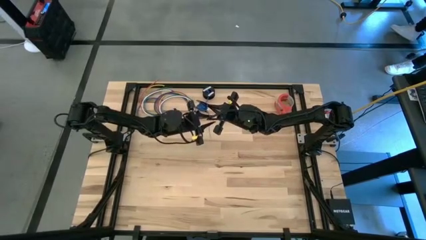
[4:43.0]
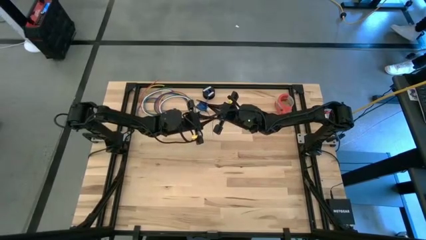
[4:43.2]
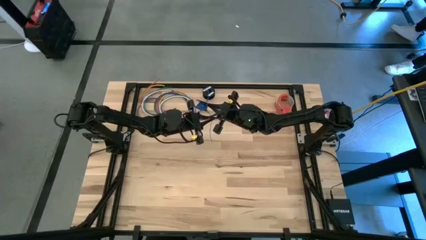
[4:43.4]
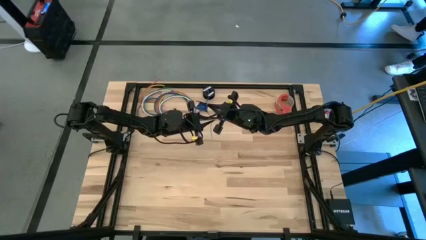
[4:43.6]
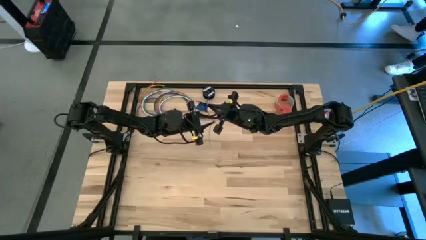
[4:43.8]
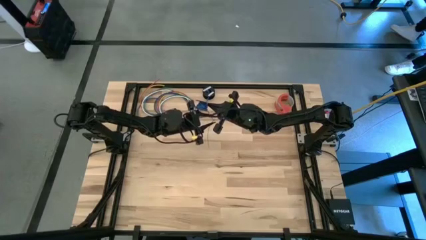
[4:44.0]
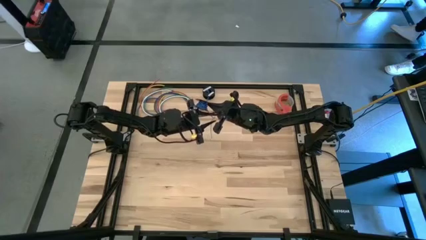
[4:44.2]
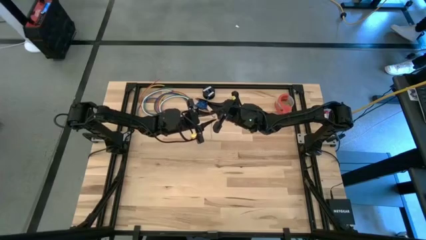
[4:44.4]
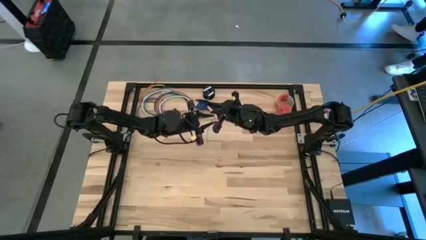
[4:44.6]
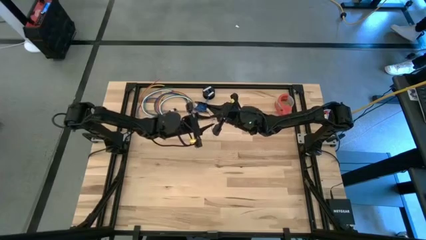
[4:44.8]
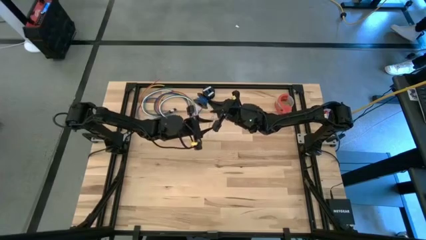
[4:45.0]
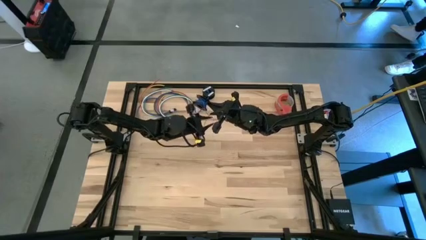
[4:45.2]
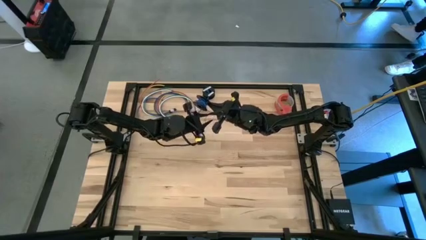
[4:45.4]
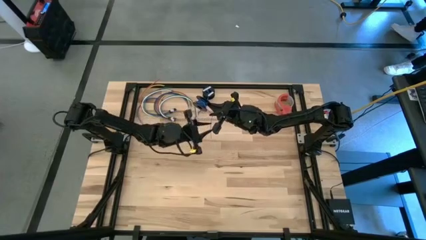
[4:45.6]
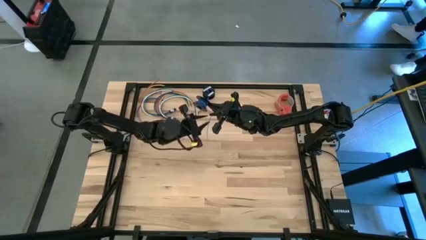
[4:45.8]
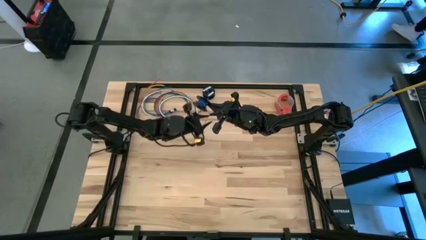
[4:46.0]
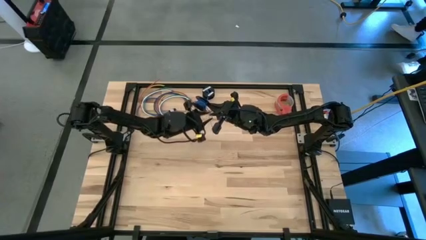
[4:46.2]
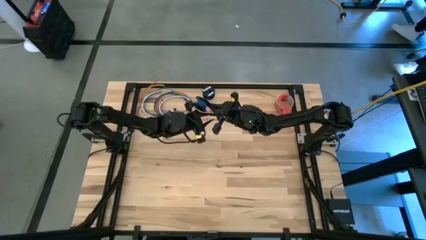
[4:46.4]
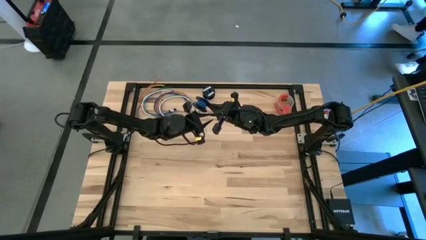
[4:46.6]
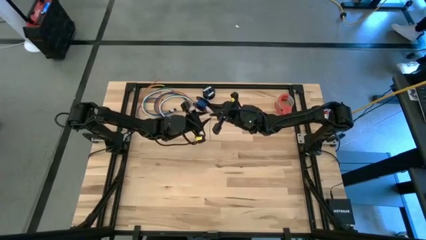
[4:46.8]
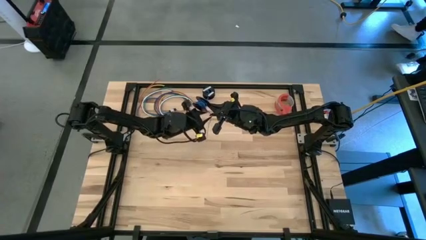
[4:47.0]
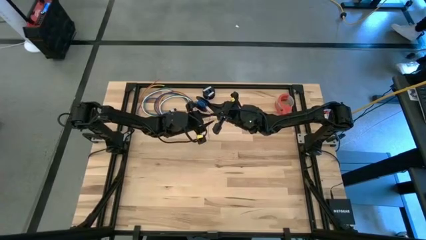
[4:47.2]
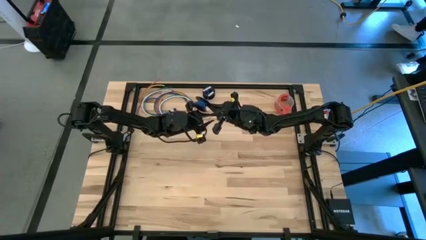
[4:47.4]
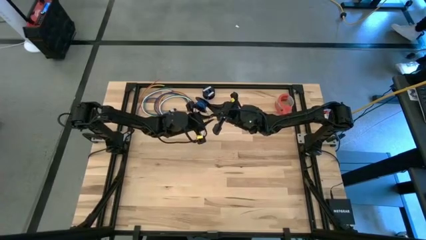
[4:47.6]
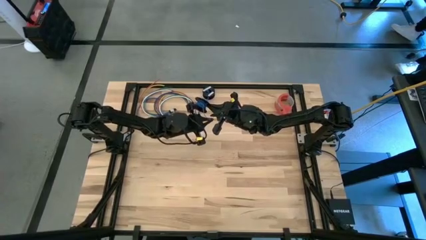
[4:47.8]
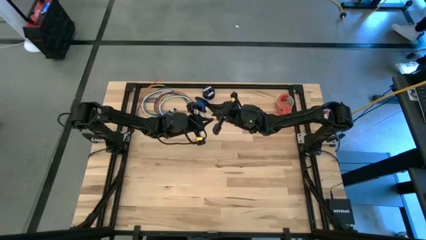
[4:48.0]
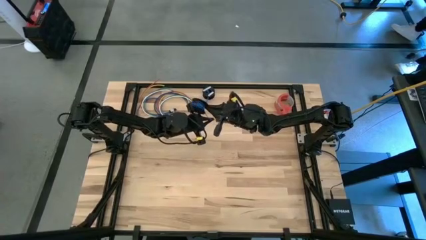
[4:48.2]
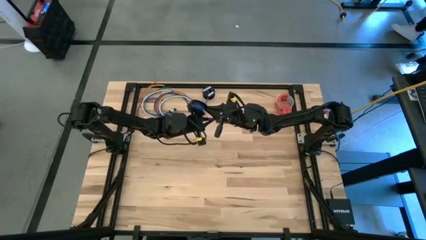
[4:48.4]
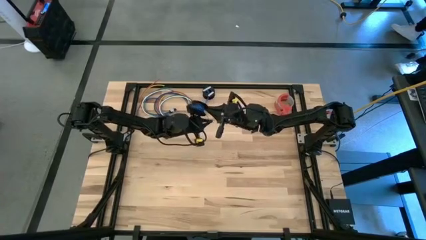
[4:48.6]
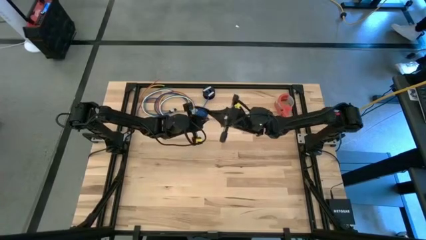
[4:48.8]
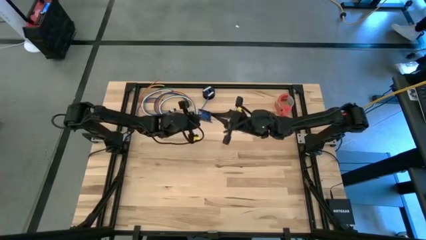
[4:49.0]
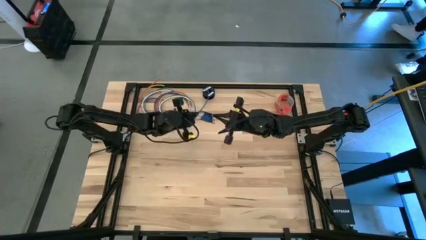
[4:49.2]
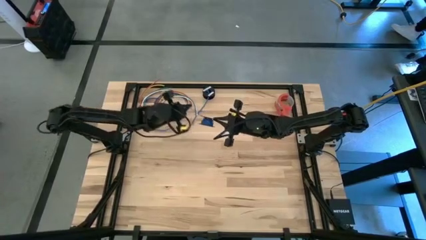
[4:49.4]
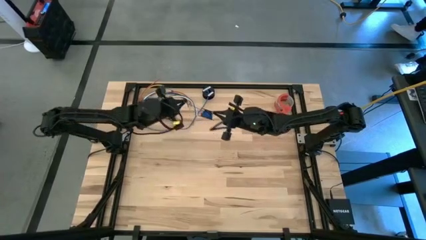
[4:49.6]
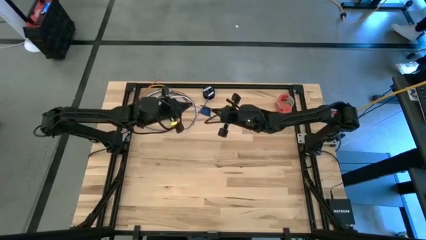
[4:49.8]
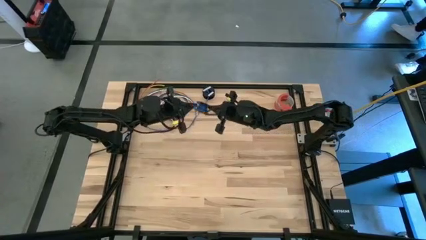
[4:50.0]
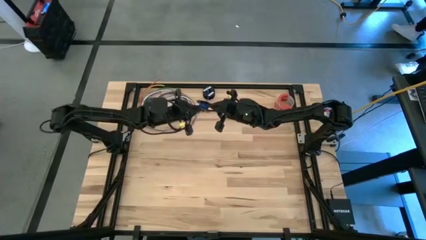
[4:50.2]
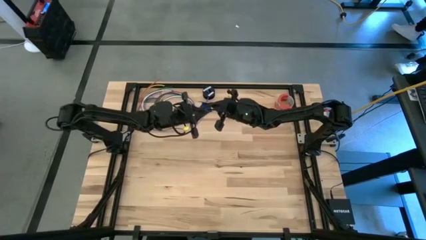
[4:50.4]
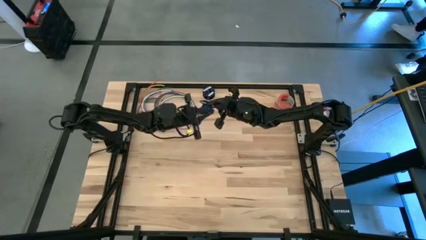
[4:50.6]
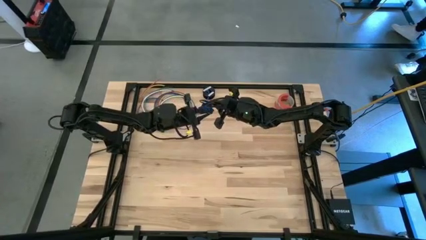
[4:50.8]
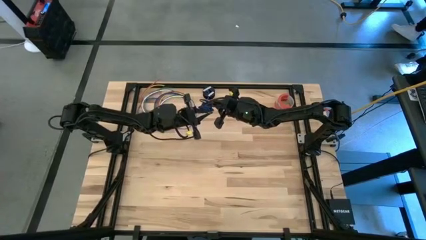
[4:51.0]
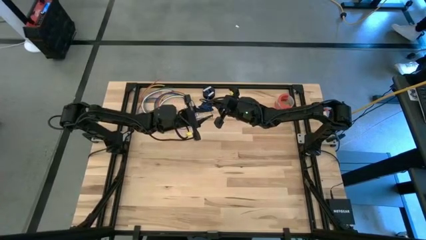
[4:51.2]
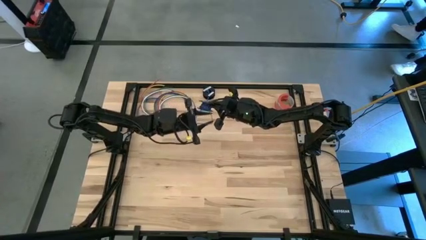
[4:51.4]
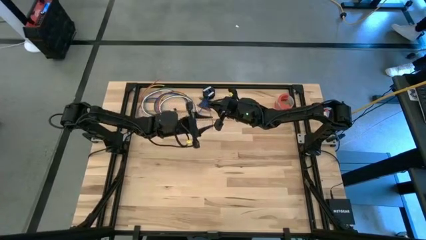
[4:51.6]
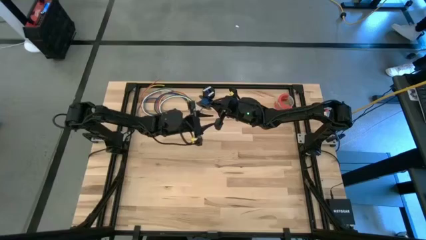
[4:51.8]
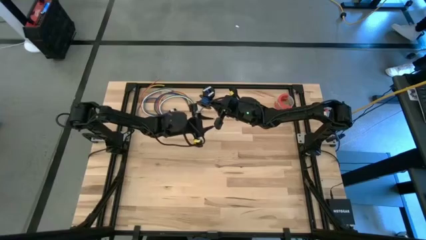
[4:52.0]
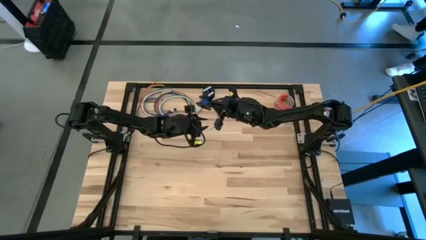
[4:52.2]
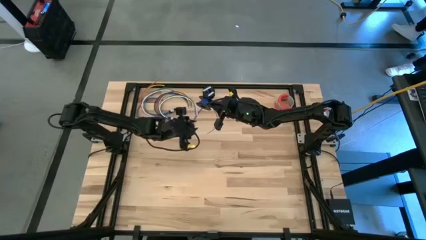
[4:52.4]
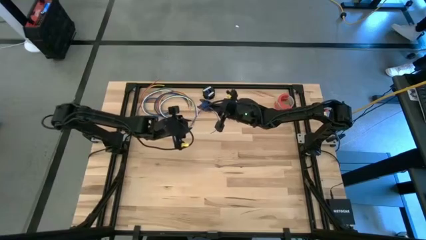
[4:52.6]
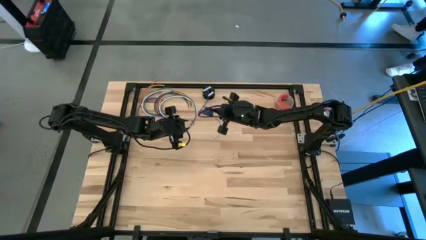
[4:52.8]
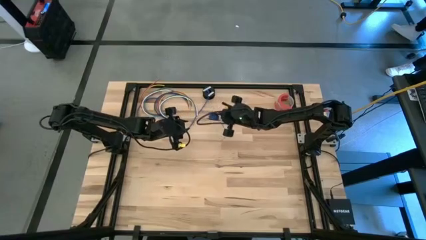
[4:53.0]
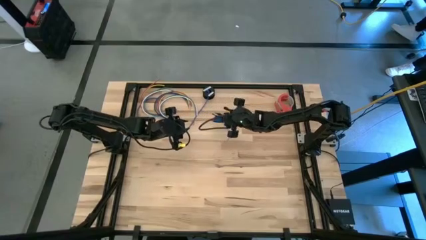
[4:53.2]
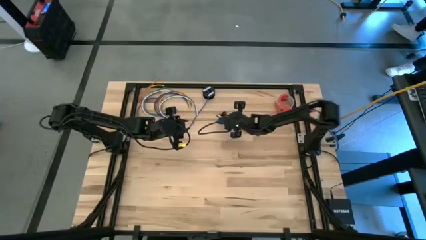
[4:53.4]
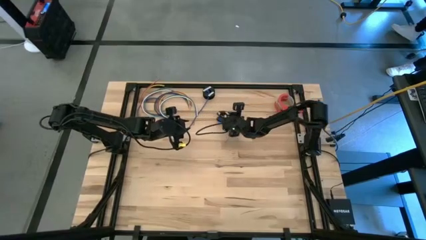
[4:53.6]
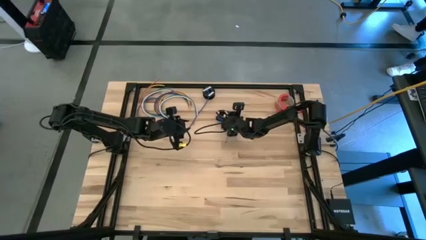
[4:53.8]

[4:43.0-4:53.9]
Task: Coil cords
Coil the blue wire onto the black spool

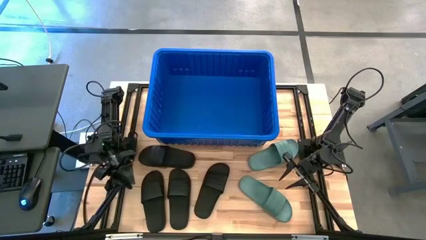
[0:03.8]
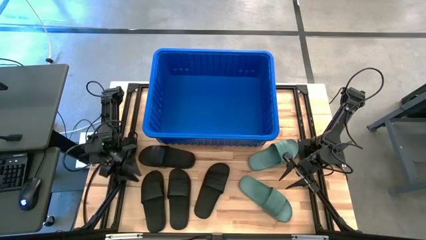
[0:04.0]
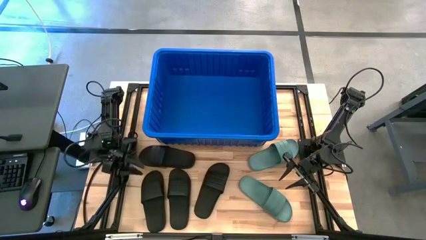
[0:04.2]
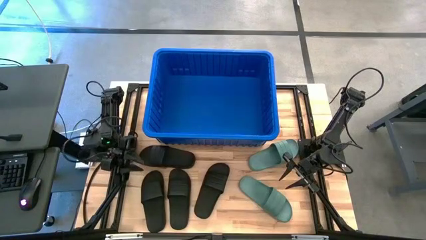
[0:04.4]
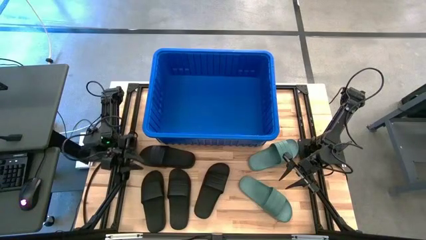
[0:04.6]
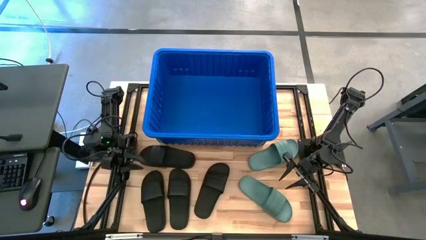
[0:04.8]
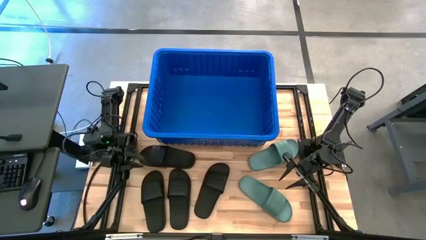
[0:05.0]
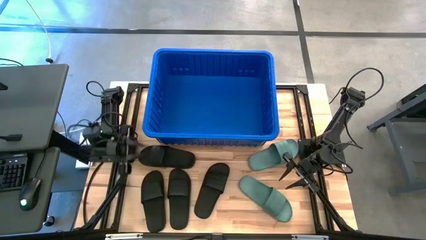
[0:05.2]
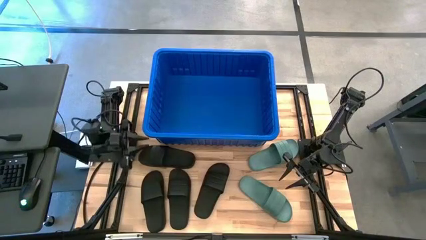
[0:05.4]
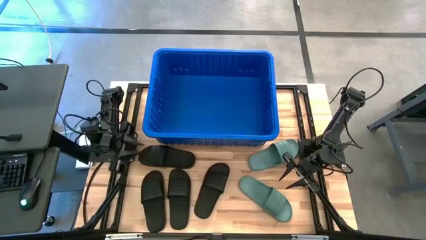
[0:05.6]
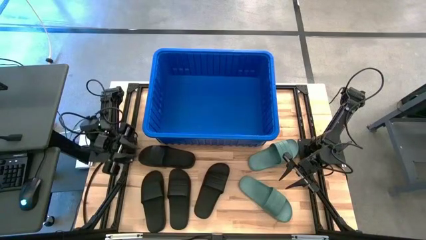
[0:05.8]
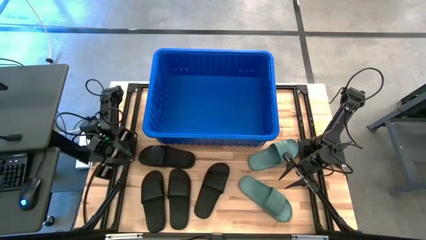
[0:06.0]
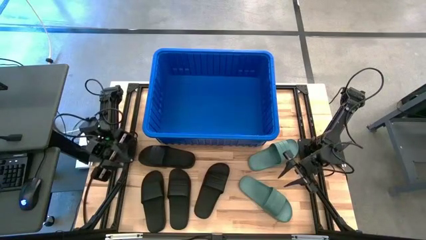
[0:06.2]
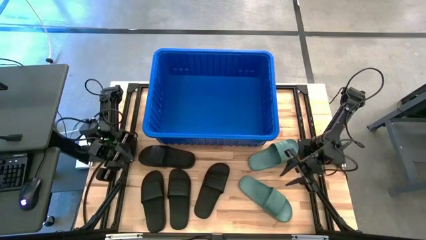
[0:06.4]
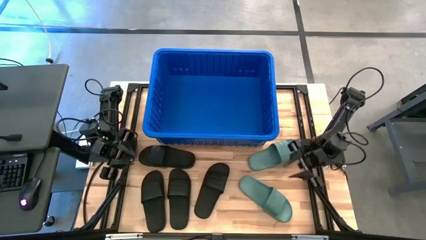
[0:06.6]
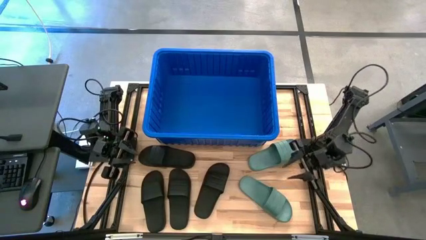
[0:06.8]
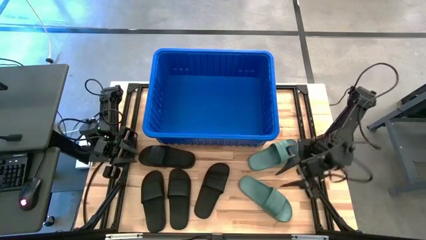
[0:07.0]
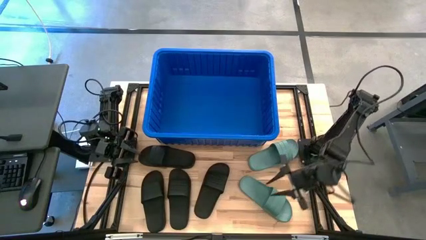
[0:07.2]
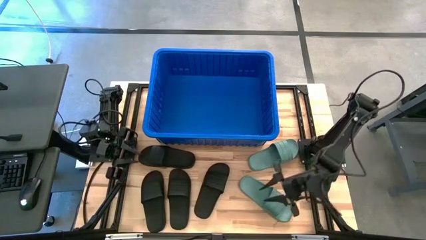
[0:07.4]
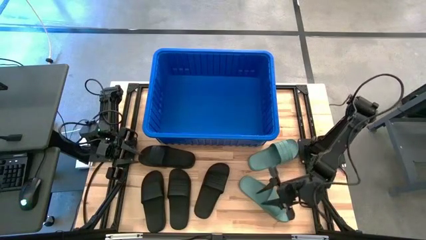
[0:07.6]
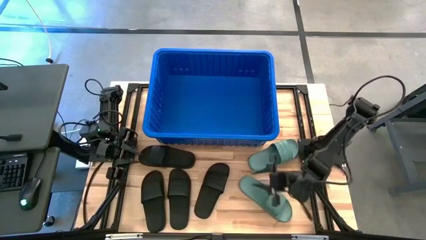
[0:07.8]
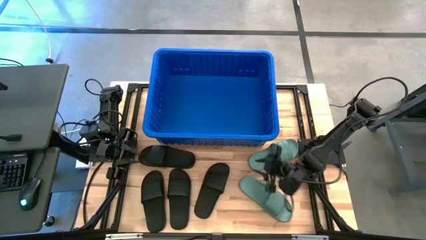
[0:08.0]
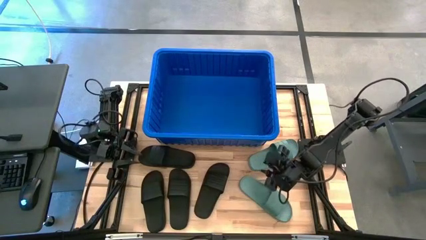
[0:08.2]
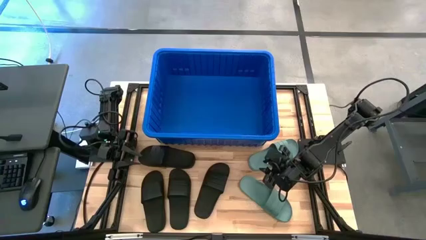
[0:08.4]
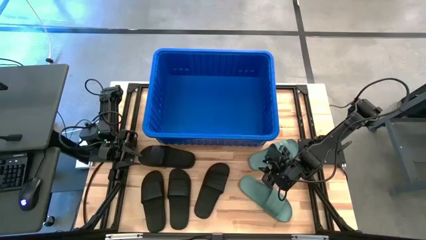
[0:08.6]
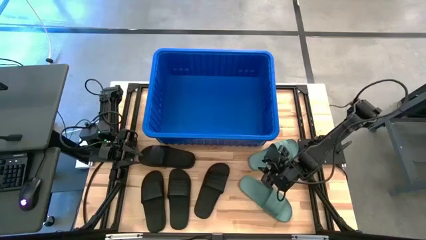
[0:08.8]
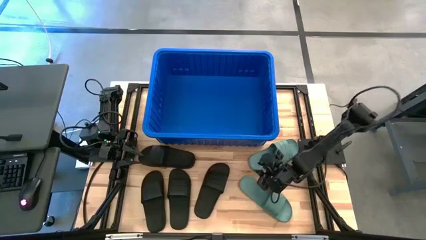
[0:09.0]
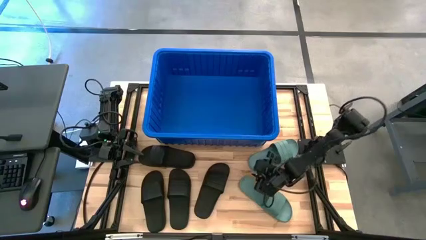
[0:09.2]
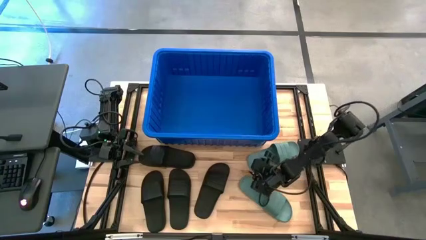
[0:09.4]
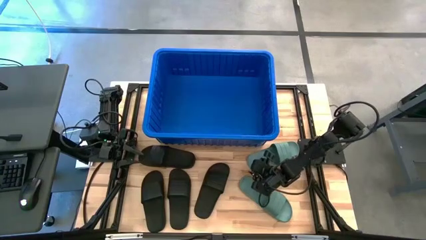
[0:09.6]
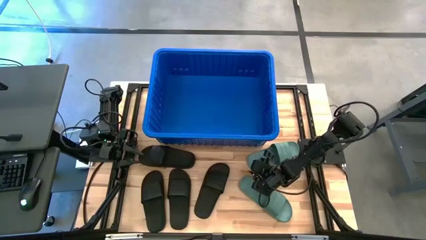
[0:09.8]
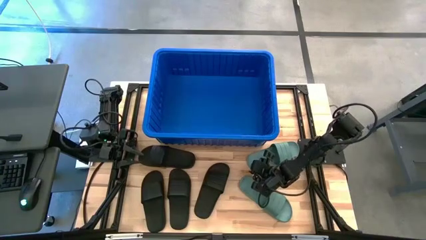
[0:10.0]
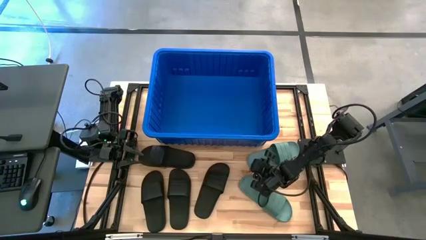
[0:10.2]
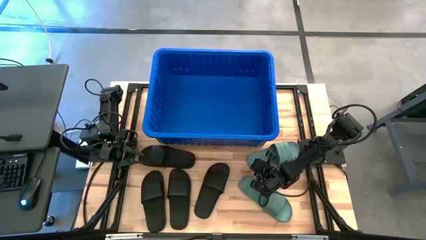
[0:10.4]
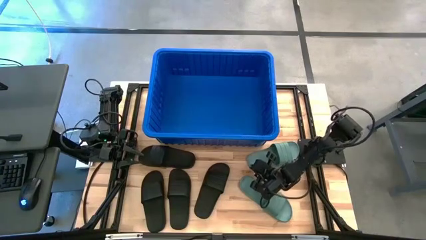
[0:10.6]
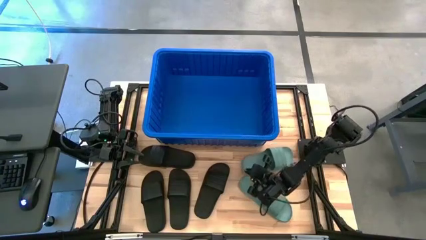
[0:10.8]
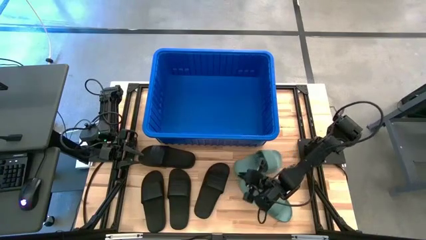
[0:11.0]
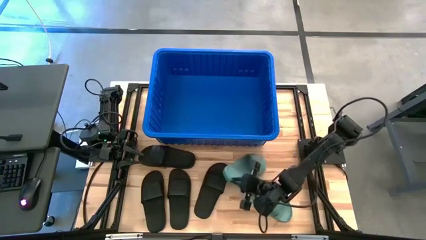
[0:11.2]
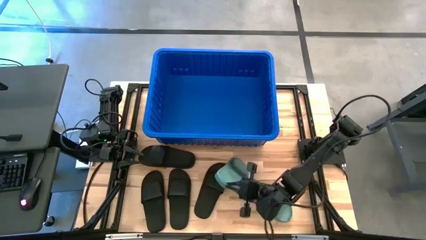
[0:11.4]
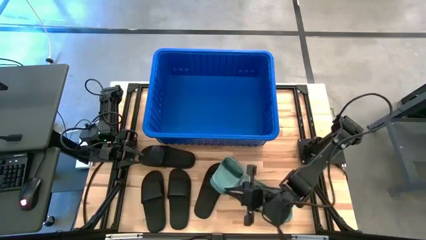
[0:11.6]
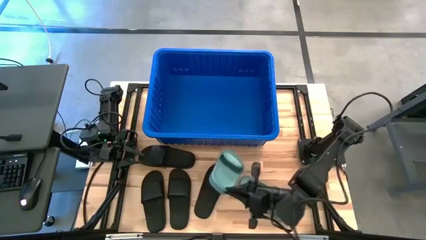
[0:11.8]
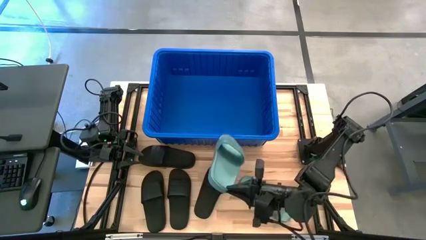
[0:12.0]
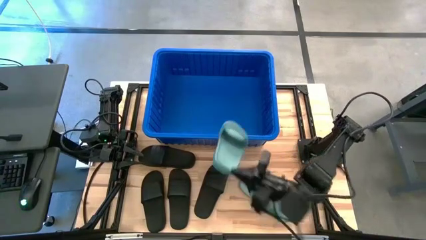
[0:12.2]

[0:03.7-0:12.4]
Task: Pick and place slides into bin
Put the green slide into the blue bin
